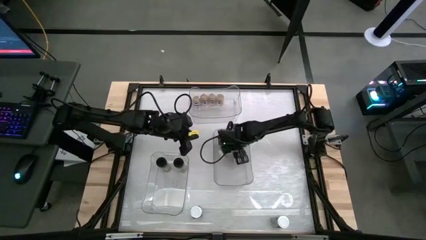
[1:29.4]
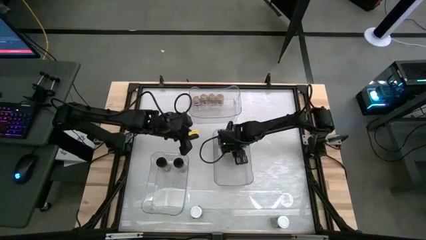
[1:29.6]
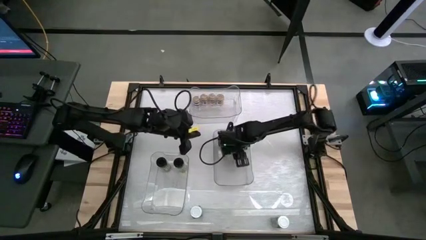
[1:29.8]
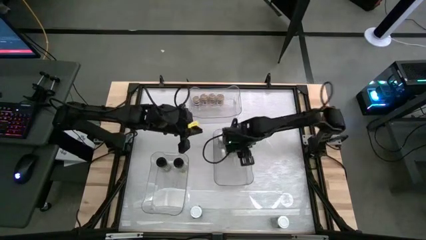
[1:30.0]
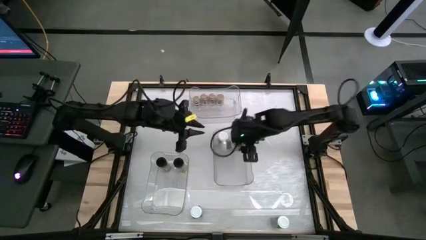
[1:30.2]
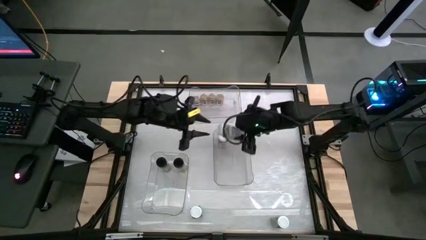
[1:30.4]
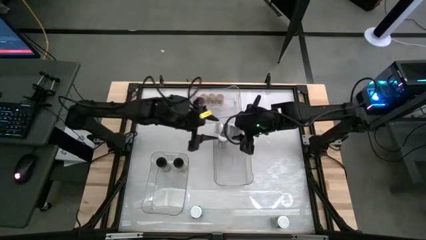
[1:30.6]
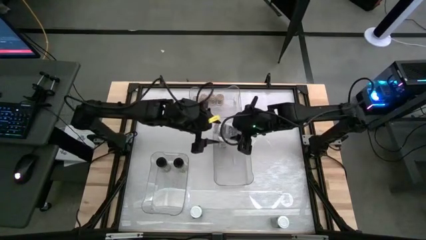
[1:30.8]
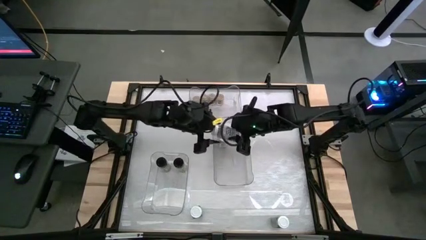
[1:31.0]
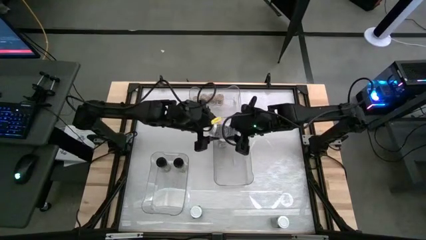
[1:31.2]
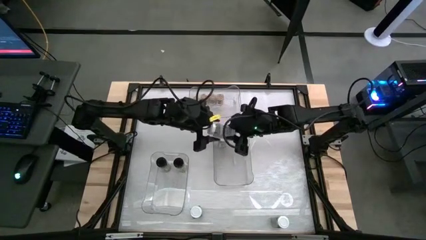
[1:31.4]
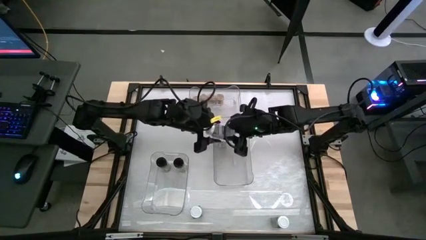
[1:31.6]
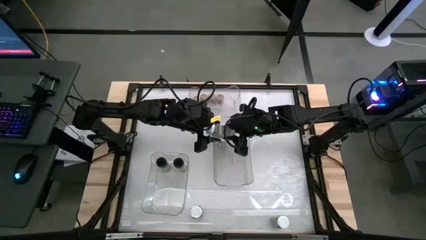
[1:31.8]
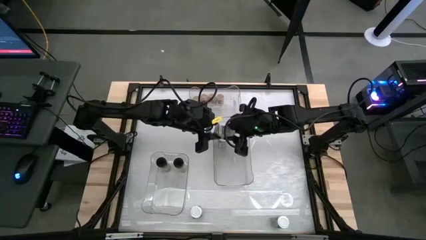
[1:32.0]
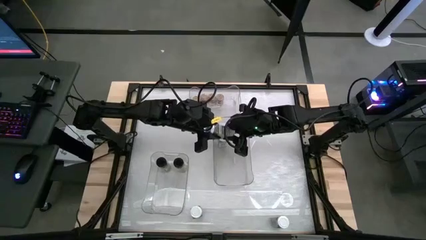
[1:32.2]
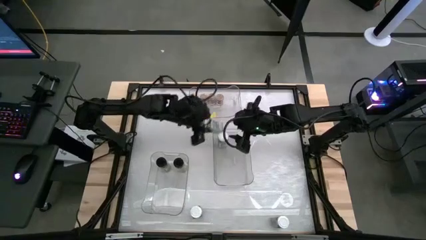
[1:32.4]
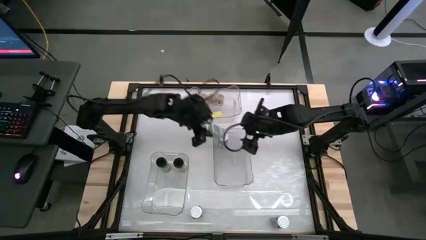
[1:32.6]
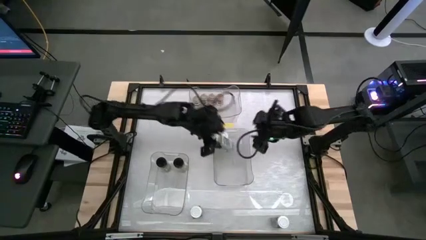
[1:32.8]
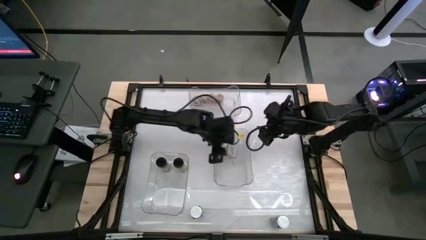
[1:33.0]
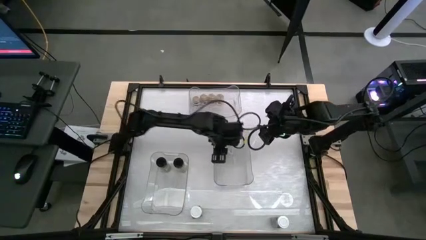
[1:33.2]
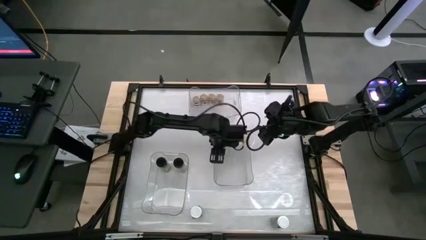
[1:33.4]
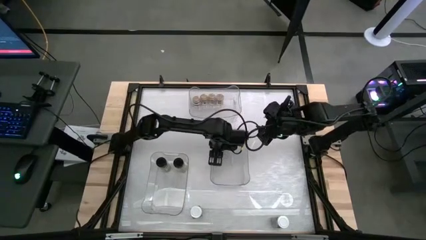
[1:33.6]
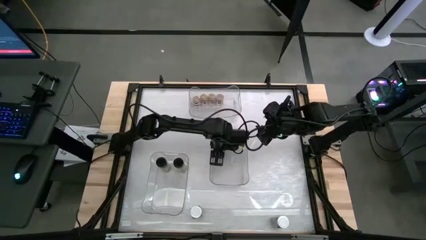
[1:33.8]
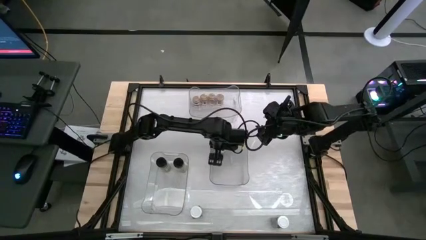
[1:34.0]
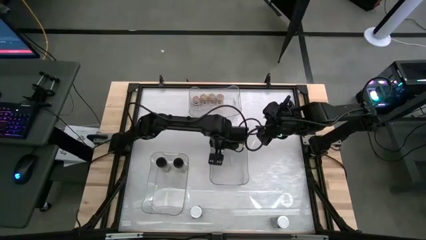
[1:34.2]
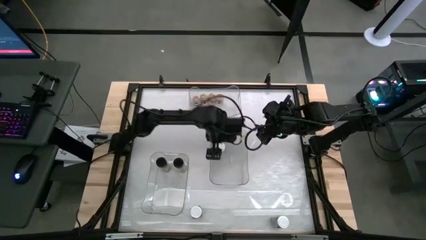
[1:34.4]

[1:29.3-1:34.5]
Task: Sort spices by type
Put the white seasoning bottle into the bottom right transparent bin

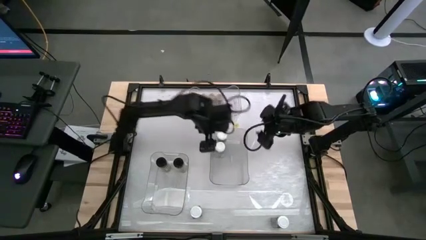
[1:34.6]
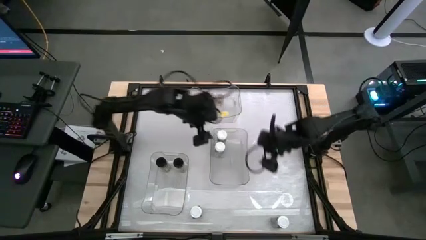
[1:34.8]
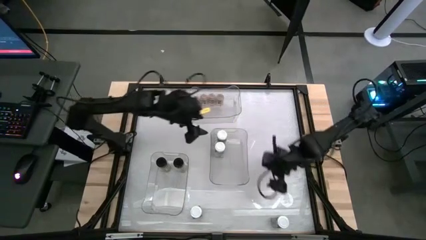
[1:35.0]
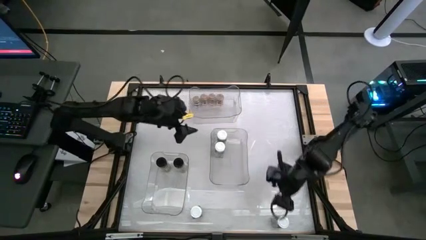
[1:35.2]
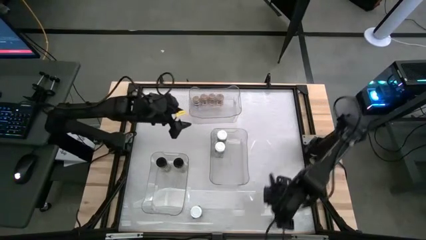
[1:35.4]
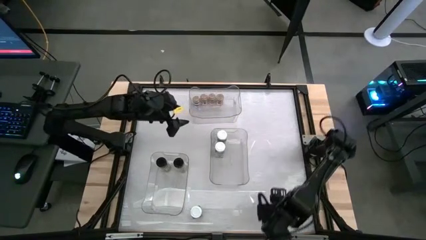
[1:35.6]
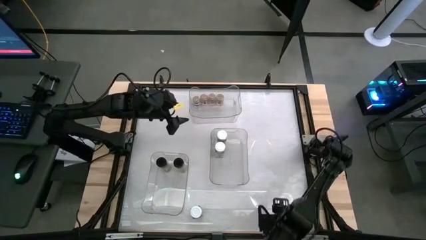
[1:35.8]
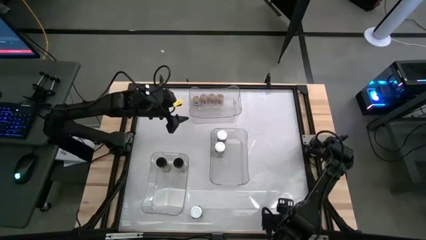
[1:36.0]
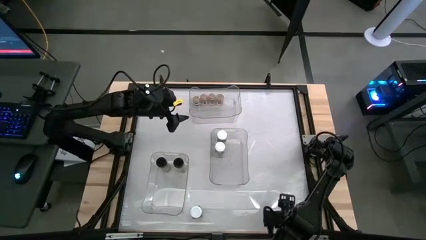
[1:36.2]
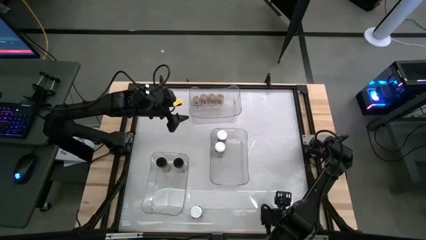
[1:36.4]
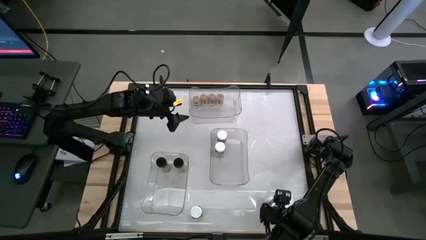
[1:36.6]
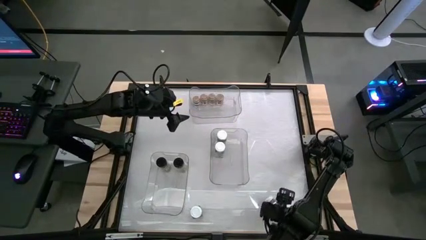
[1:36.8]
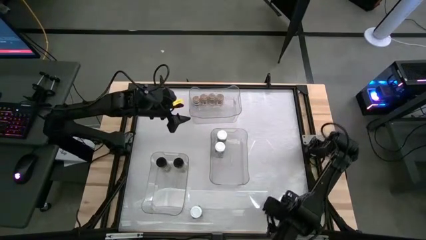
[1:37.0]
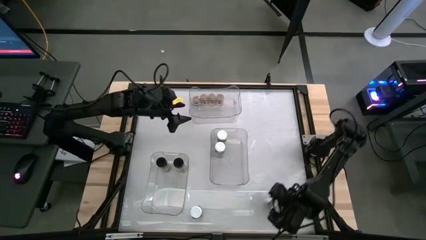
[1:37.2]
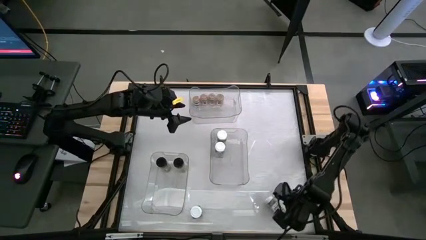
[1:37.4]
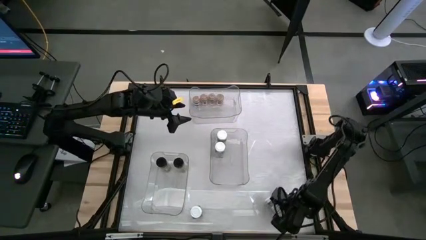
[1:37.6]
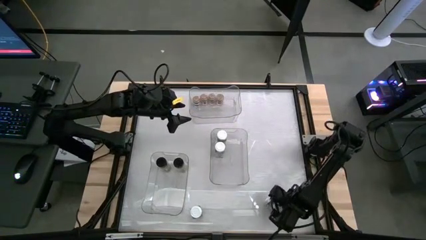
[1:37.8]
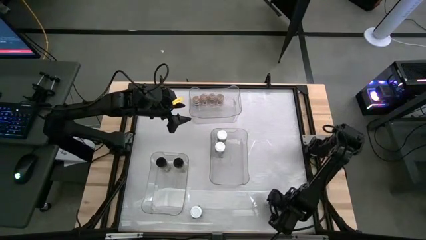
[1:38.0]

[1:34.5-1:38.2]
Put the white seasoning bottle into the bottom right transparent bin

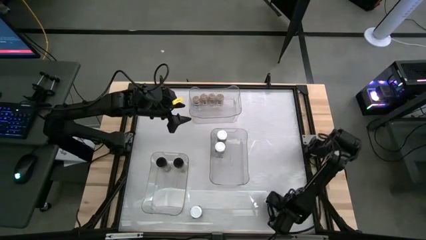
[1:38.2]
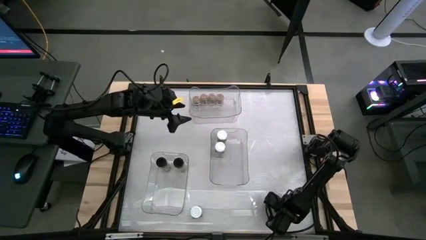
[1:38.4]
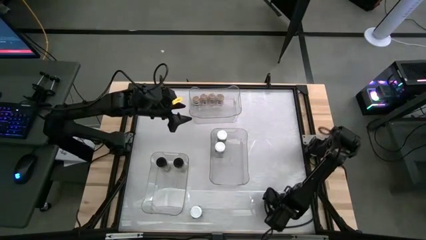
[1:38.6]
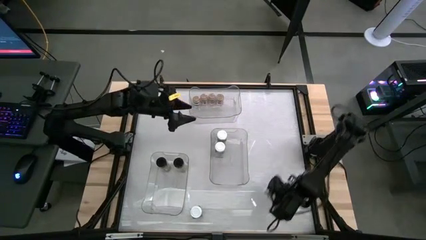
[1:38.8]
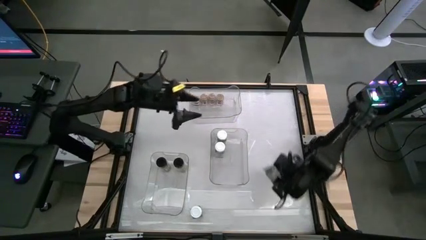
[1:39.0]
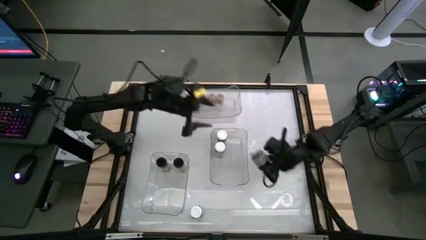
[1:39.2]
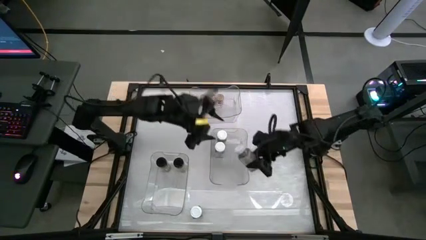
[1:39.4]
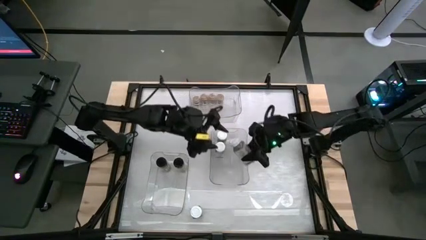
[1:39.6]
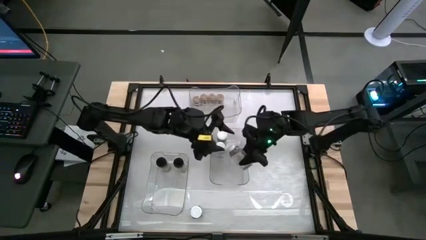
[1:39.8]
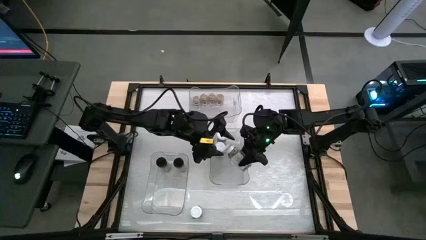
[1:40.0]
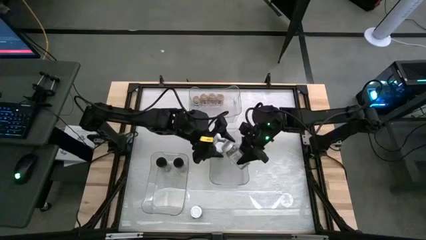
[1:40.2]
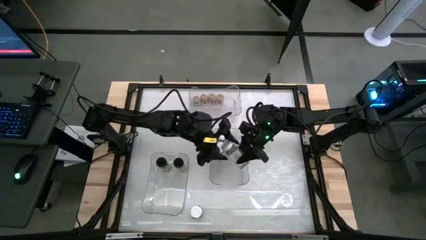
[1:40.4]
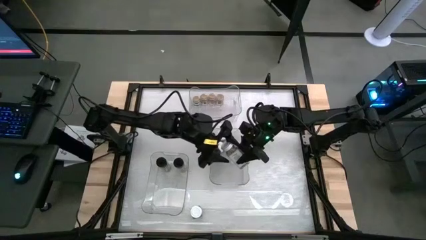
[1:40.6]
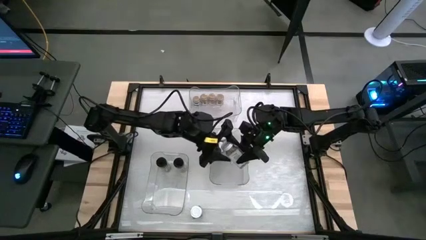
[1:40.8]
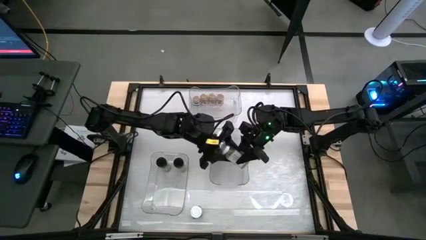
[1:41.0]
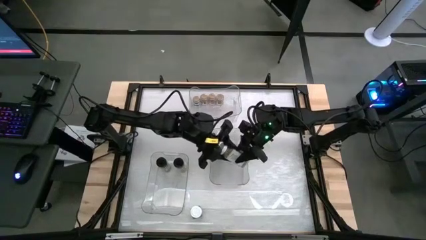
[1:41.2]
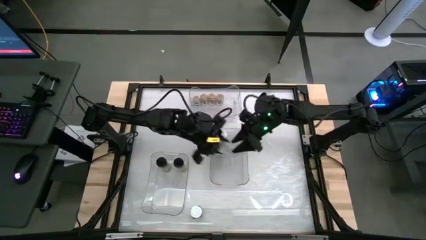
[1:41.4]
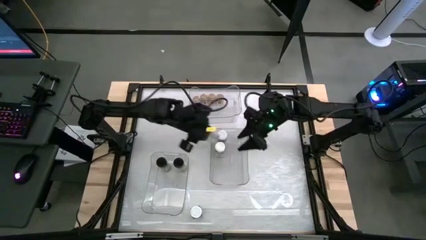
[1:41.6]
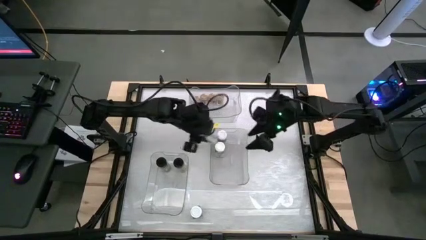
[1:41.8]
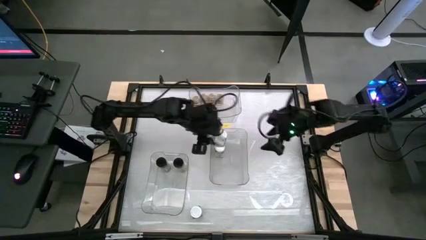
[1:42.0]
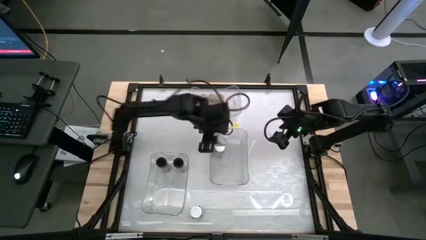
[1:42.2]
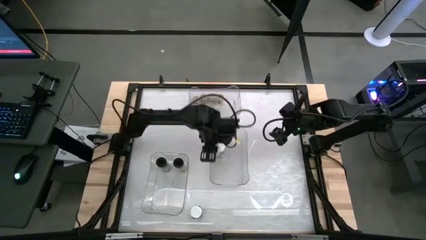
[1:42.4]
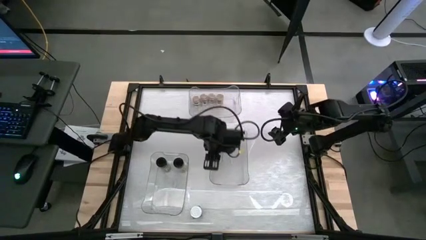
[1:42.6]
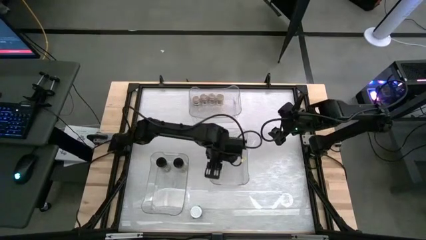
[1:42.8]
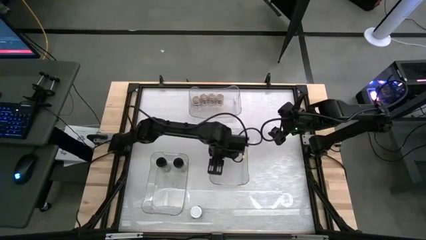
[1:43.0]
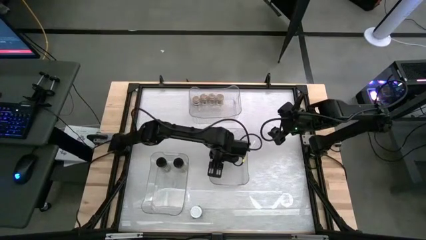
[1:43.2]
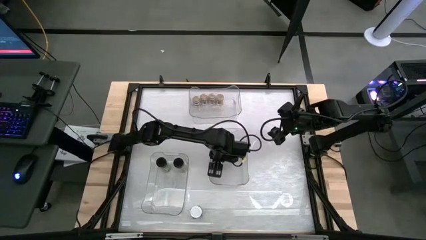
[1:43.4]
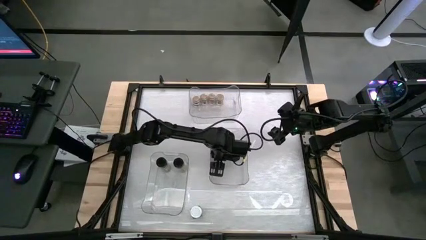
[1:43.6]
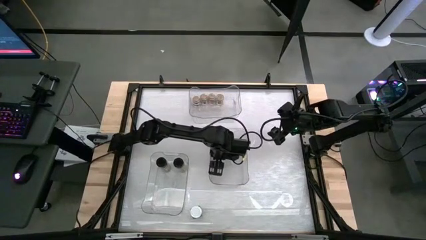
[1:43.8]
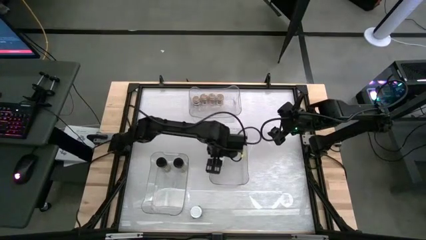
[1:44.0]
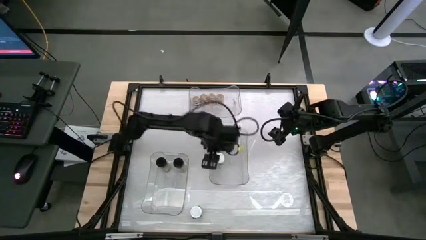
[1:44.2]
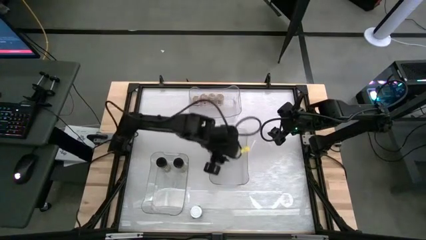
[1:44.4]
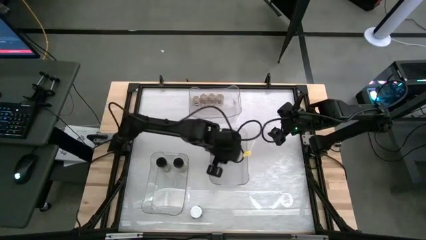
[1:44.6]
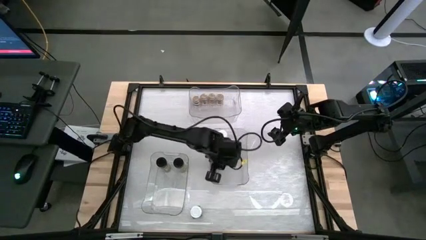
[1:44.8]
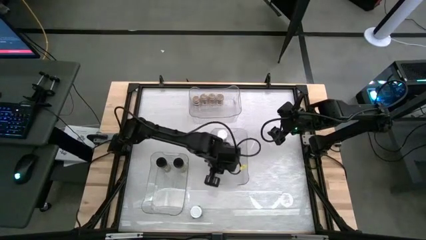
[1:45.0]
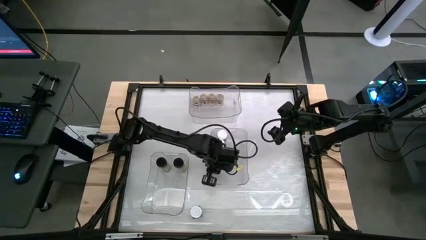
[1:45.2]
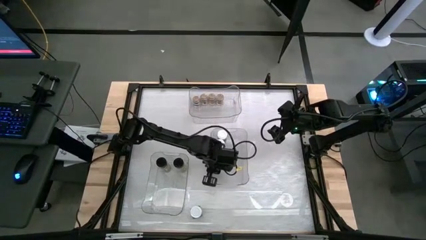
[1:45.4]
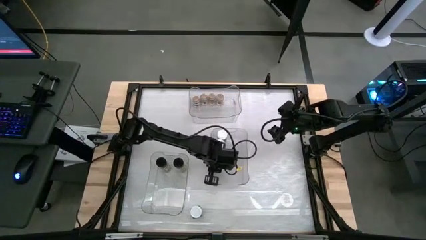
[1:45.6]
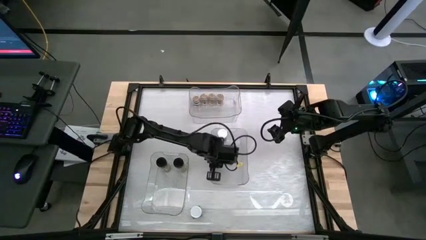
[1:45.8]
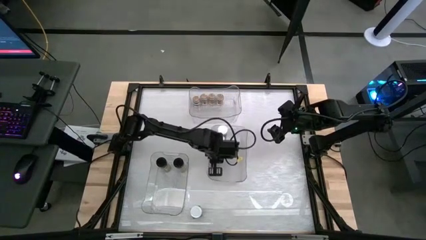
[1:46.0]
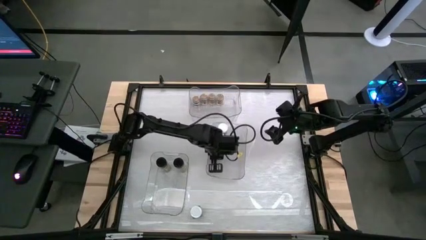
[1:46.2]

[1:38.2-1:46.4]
Put the white seasoning bottle into the bottom right transparent bin
